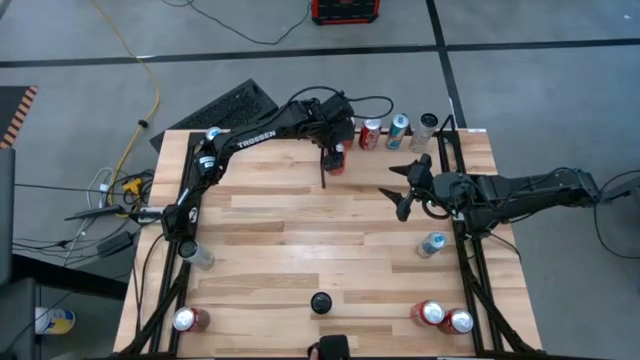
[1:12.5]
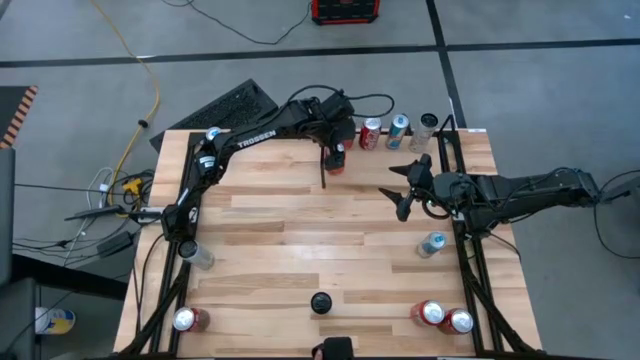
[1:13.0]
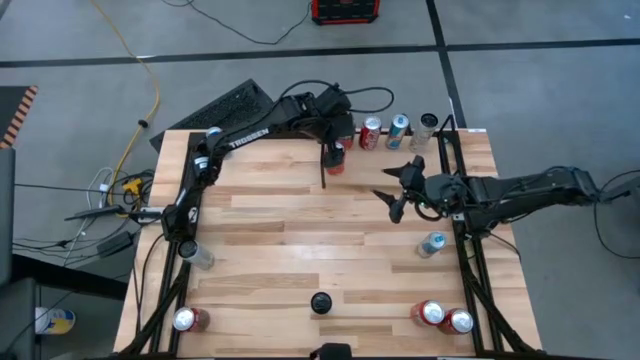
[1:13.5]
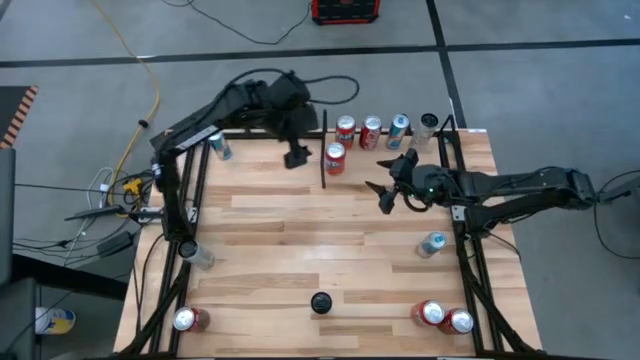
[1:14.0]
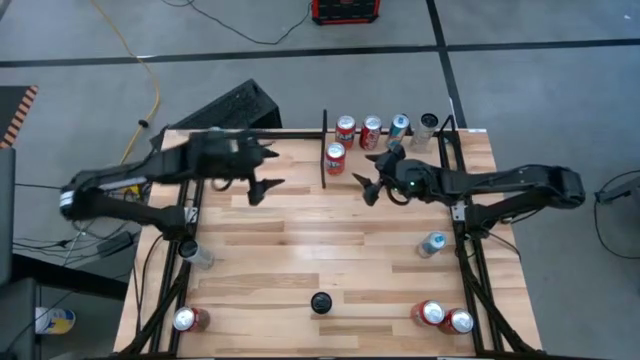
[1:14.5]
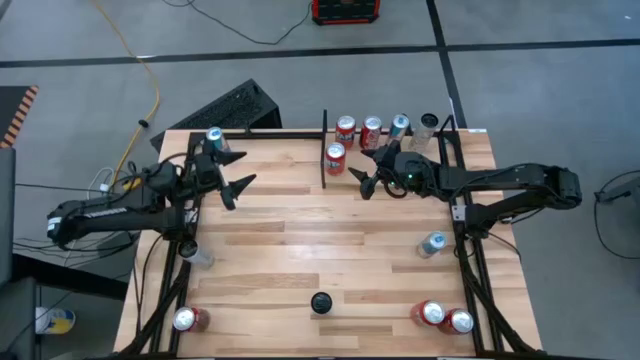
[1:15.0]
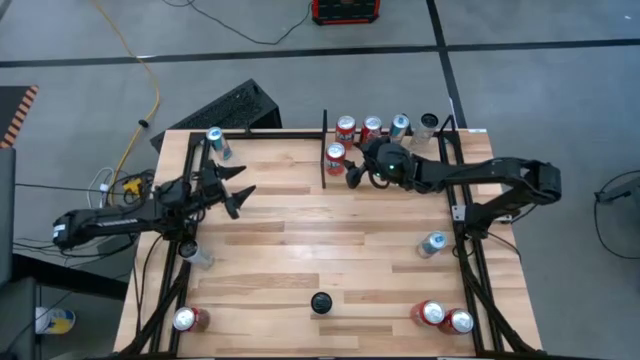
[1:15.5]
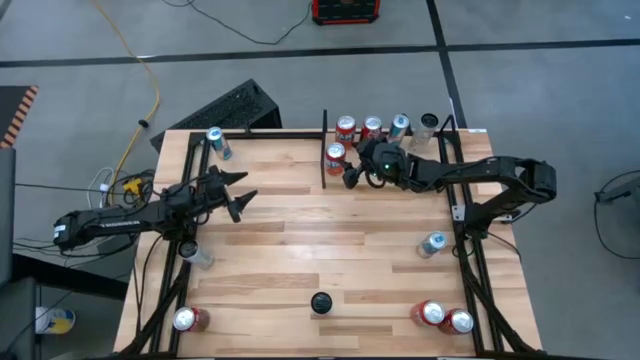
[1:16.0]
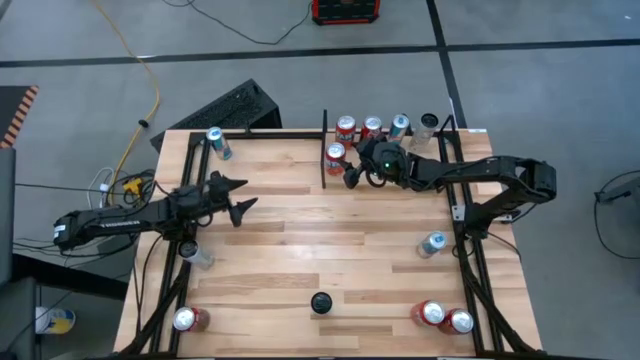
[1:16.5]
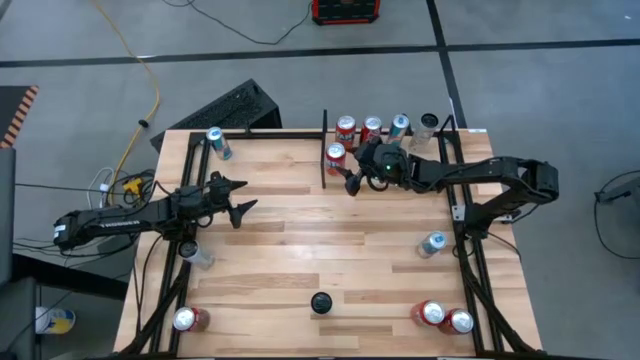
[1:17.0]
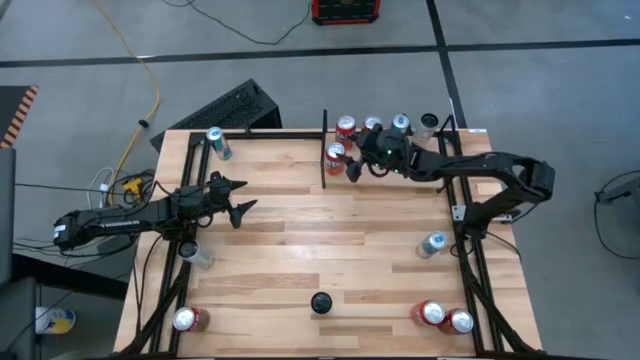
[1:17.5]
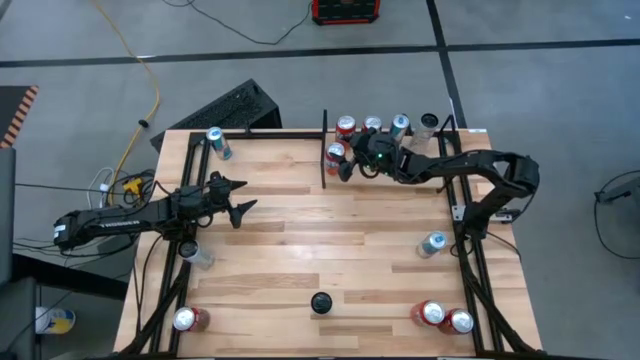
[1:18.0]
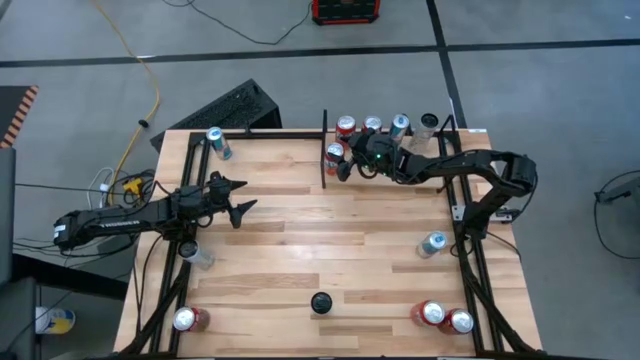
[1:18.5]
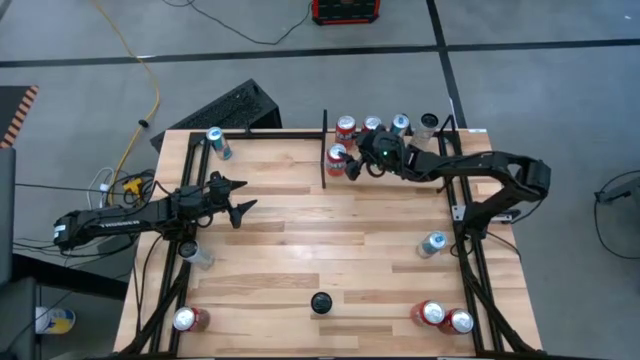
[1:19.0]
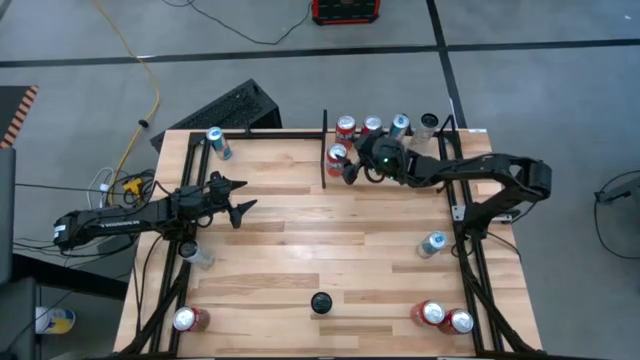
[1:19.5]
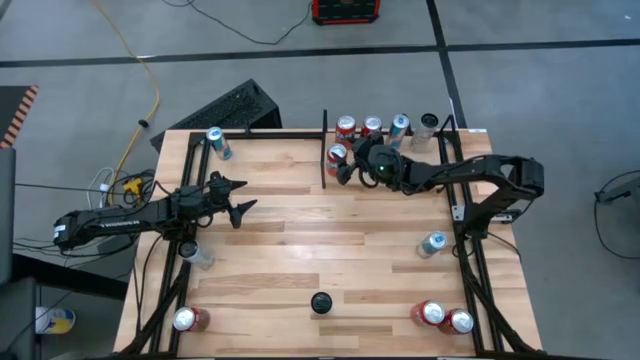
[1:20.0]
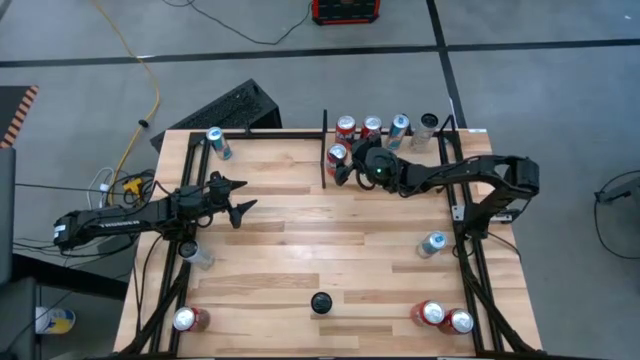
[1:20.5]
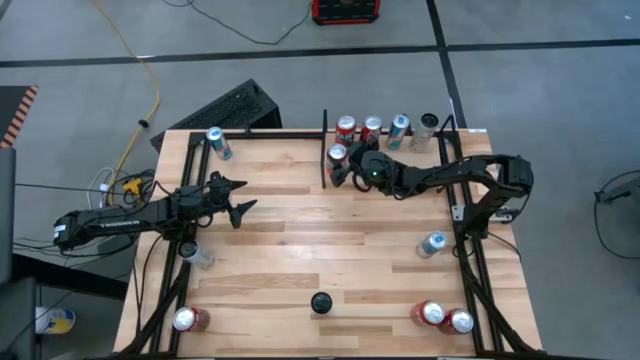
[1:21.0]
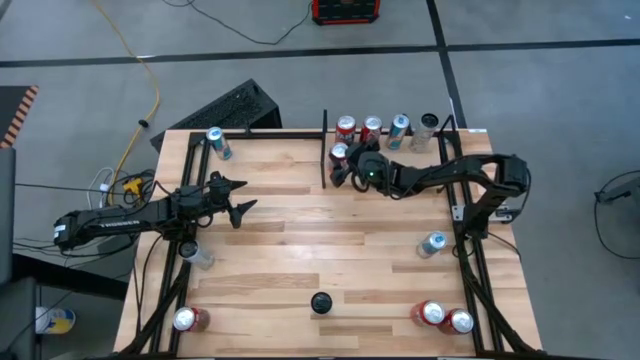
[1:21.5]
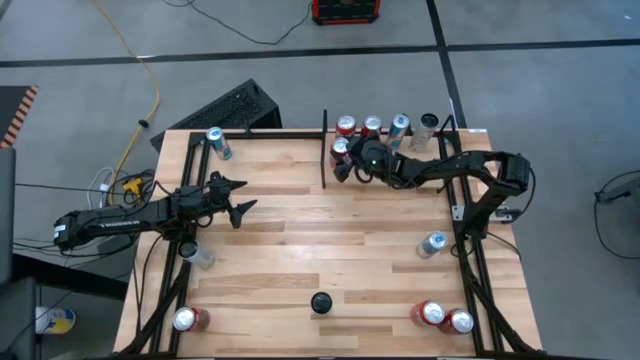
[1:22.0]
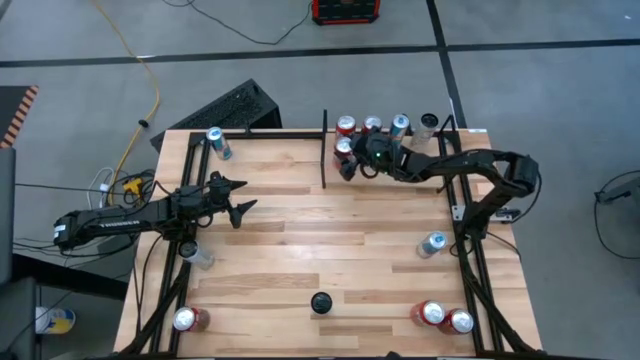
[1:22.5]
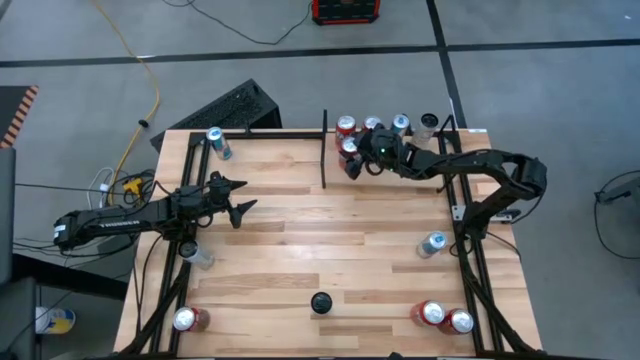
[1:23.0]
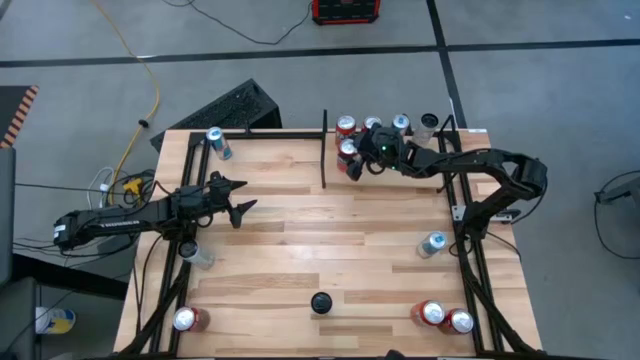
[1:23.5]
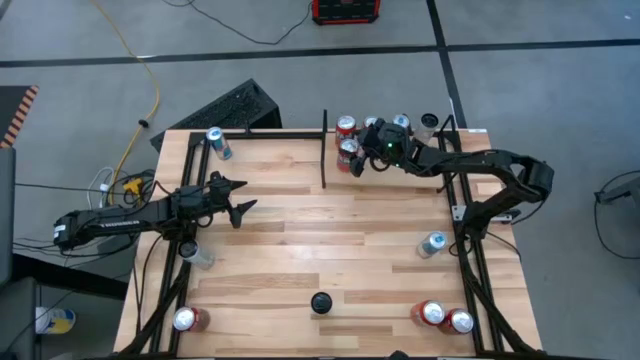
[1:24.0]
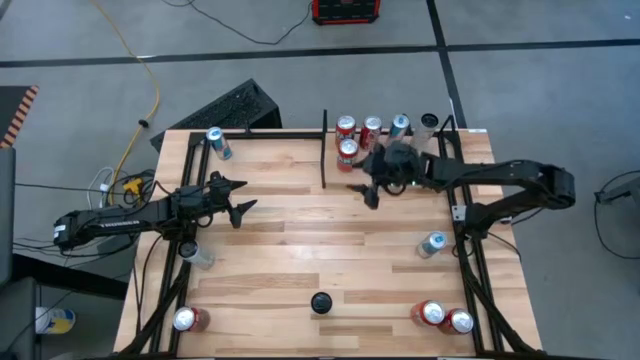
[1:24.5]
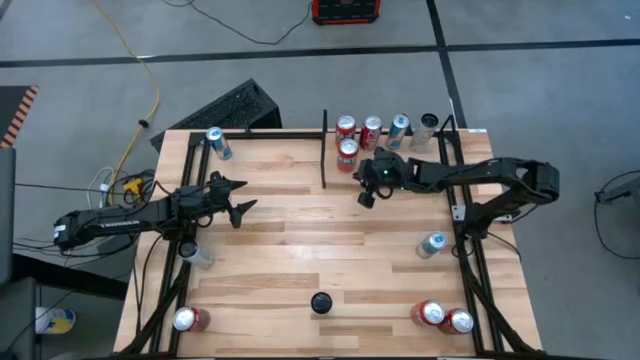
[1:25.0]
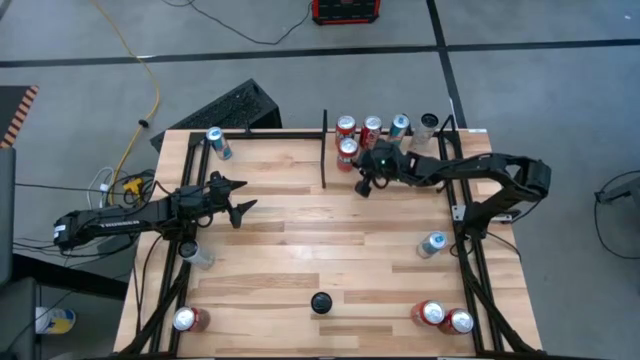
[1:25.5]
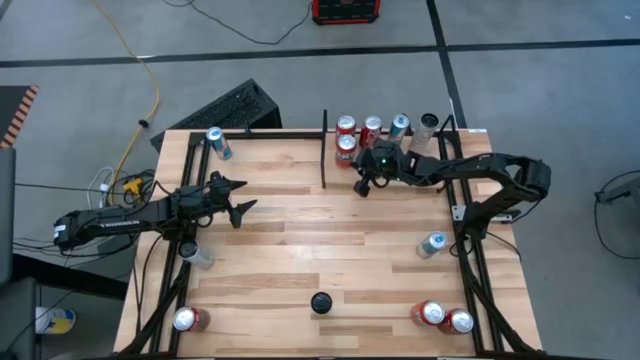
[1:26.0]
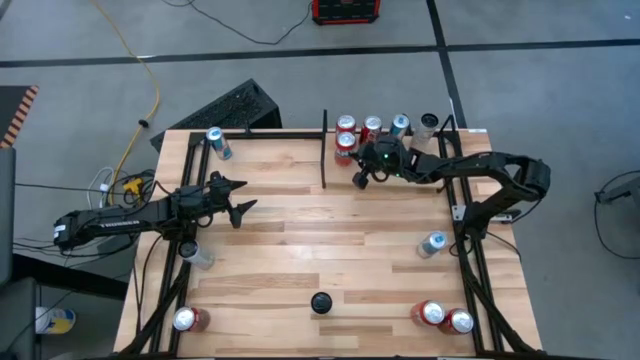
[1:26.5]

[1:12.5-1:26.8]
Task: Place canned beverage on shelf
Put the top orange soda can on the shelf aligned with the other orange soda can

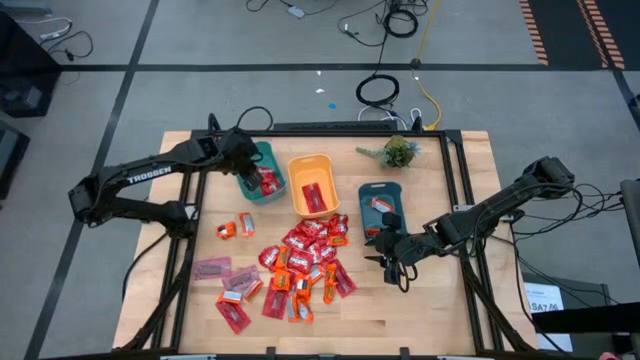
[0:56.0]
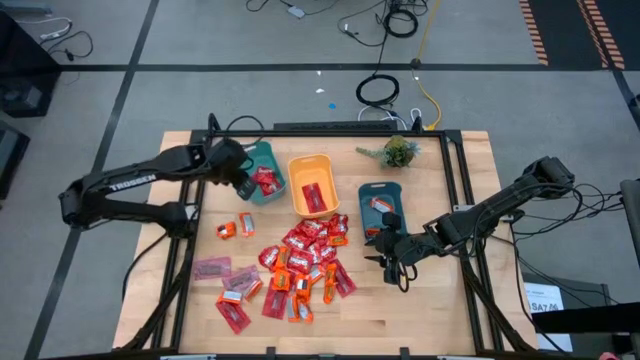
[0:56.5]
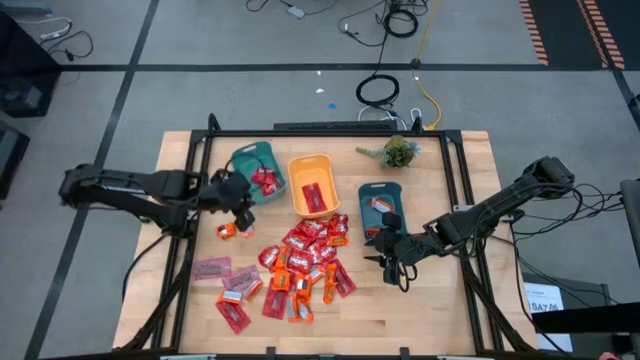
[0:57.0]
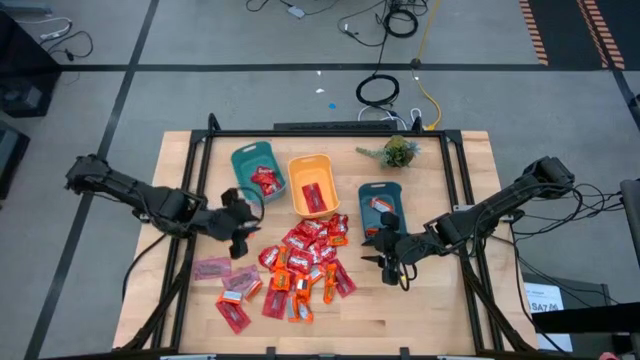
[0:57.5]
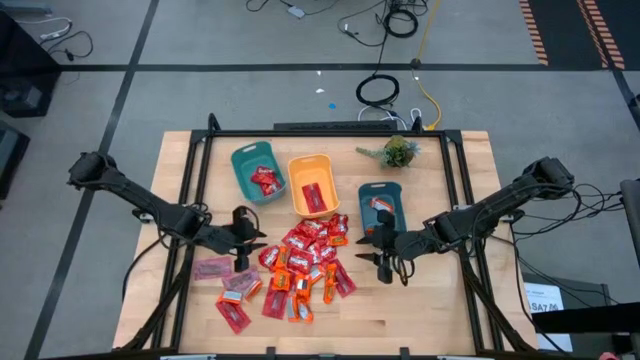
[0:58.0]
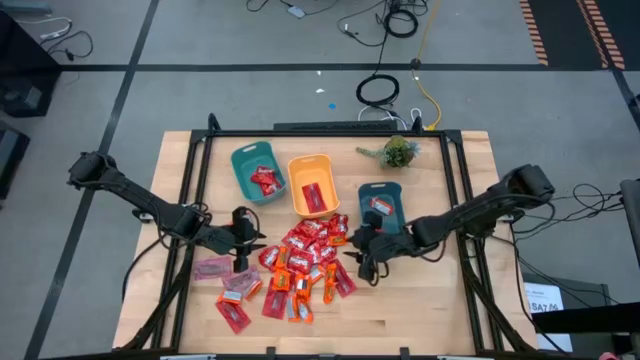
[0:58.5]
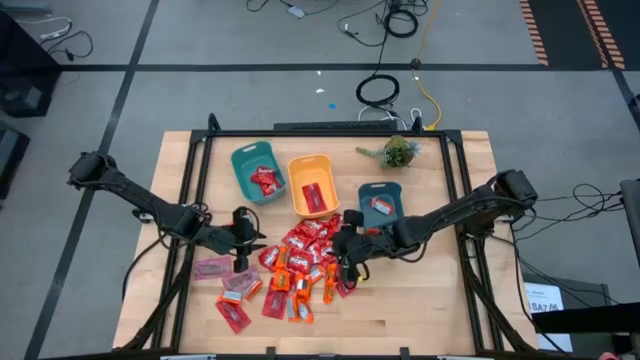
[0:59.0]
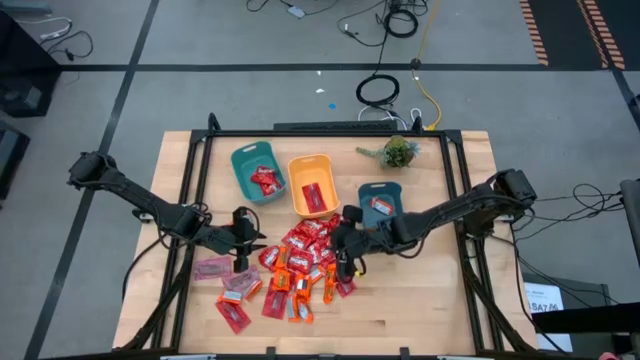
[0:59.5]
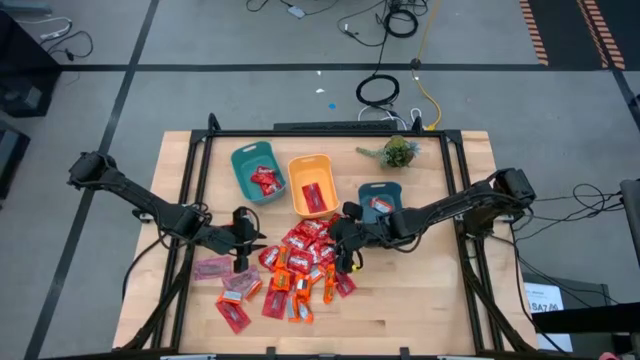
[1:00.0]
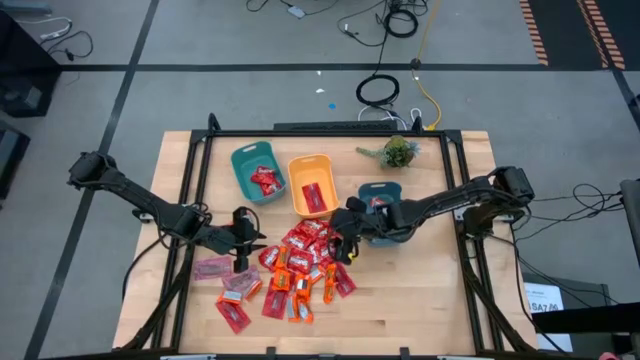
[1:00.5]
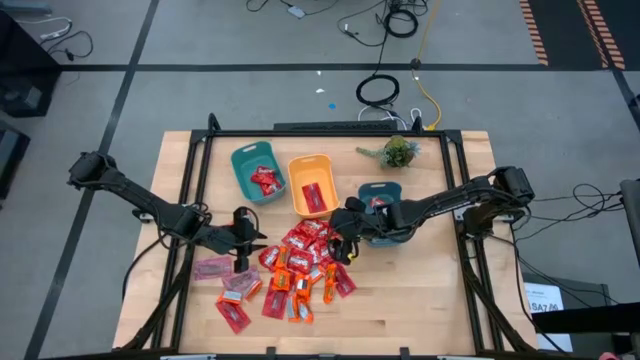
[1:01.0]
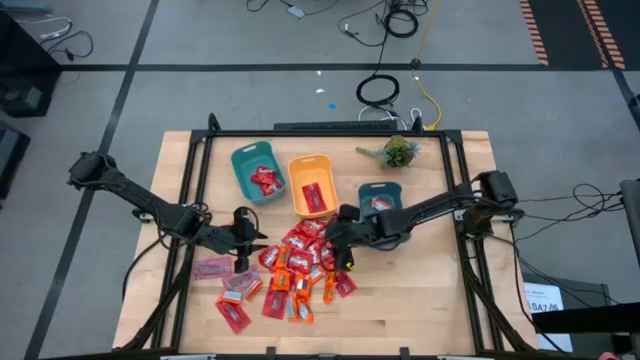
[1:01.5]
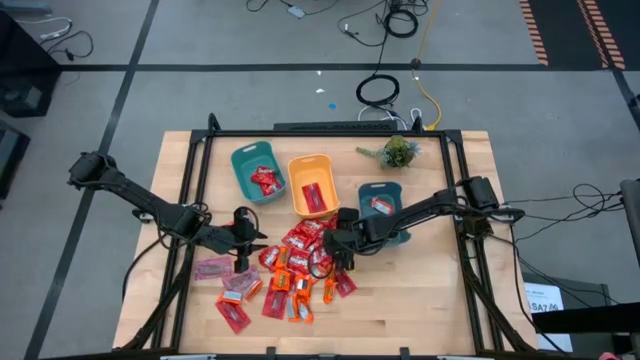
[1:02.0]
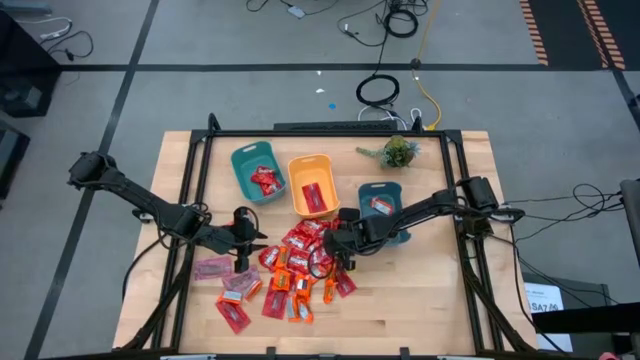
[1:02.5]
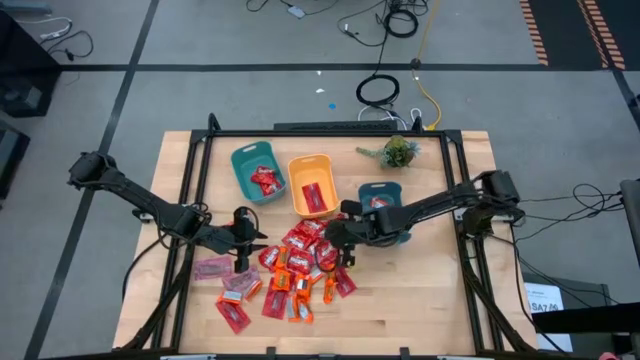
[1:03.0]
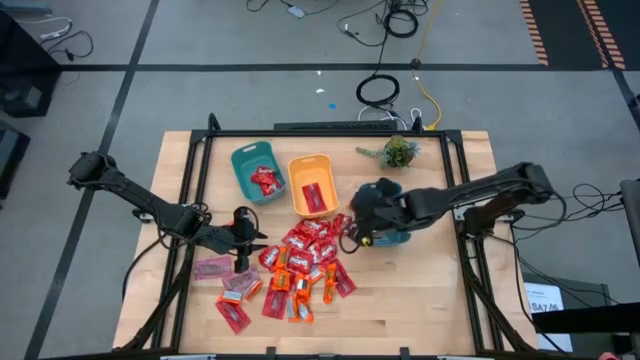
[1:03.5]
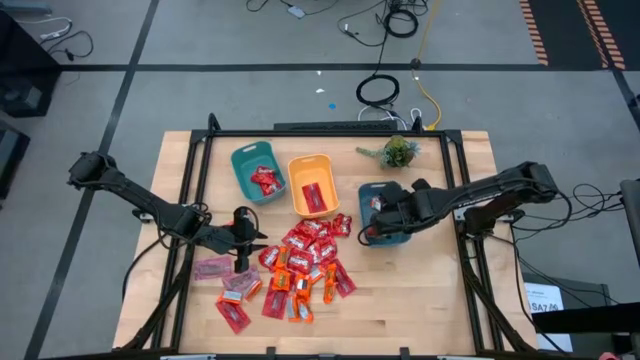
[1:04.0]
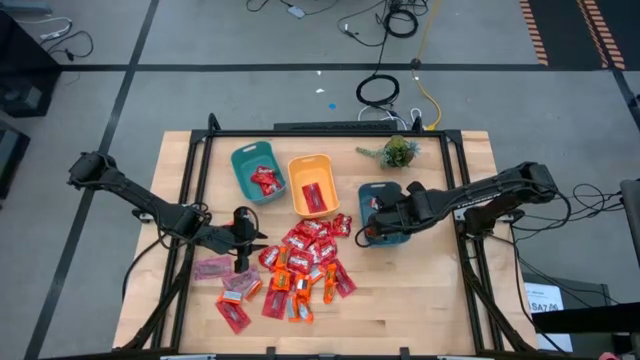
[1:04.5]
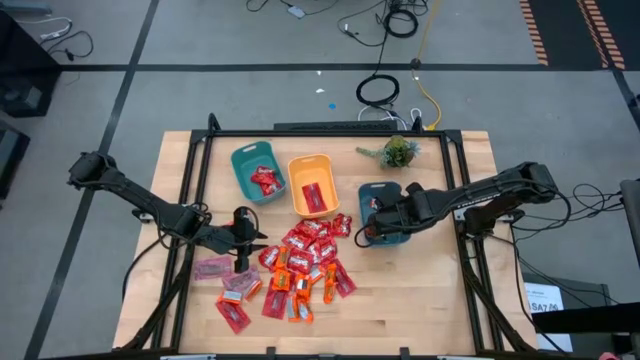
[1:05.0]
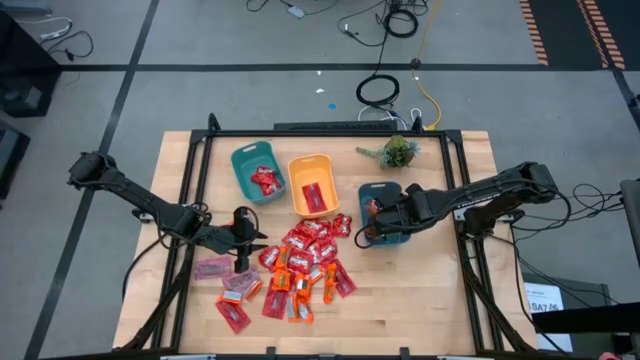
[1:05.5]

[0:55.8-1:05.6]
Task: Sort candy
Put the orange wrapper chocolate into the dark blue bin
